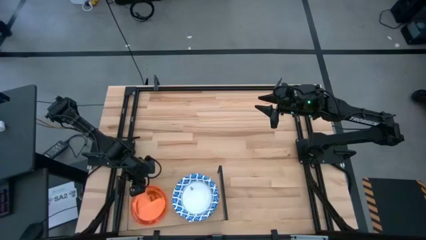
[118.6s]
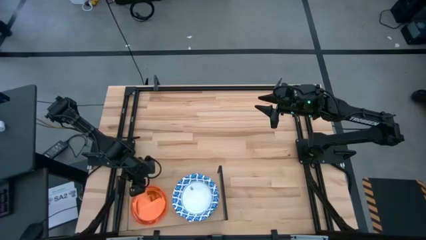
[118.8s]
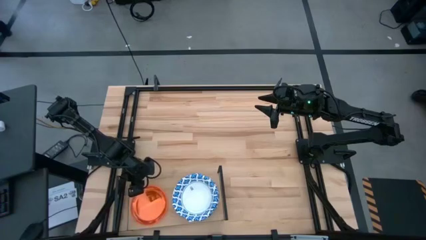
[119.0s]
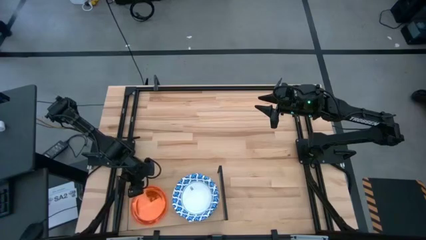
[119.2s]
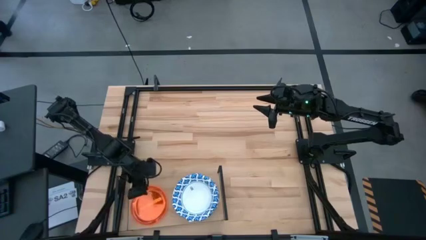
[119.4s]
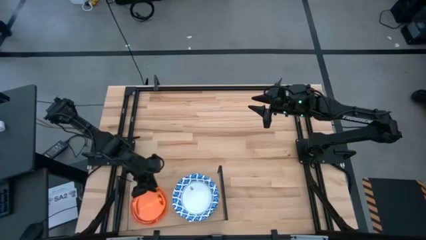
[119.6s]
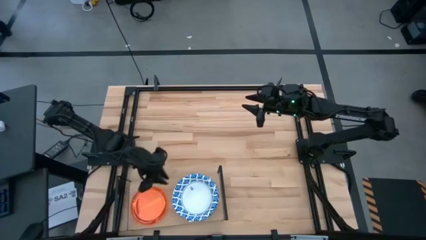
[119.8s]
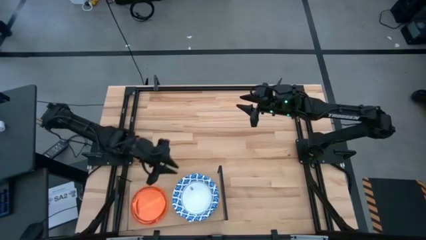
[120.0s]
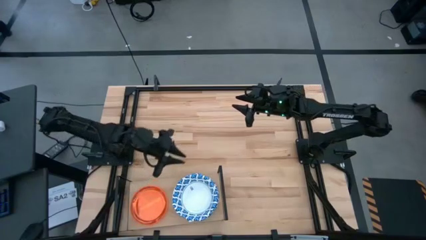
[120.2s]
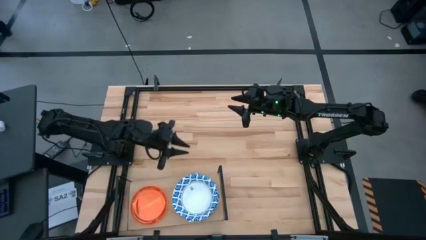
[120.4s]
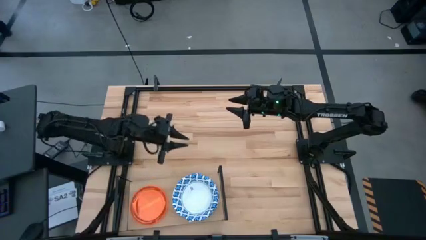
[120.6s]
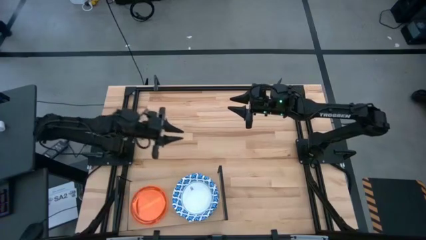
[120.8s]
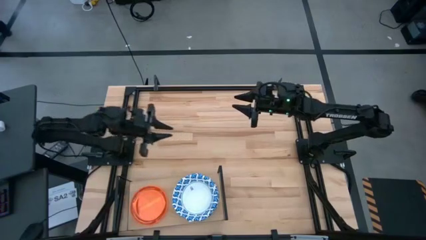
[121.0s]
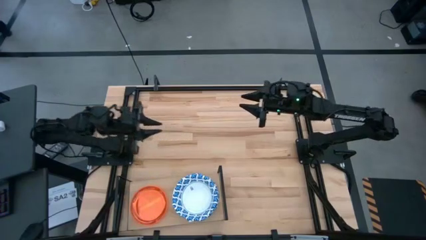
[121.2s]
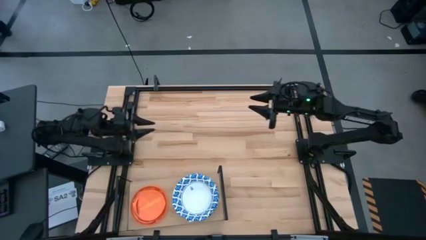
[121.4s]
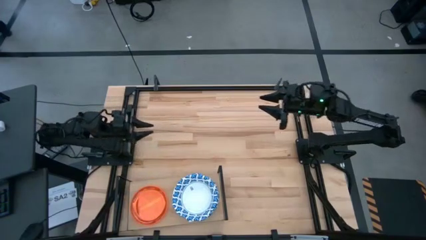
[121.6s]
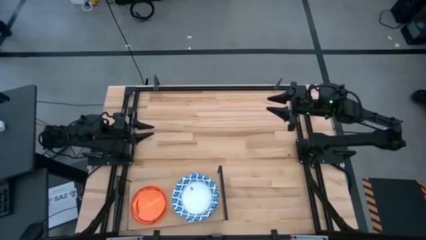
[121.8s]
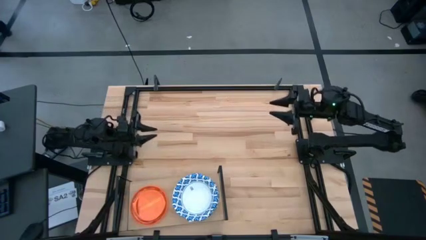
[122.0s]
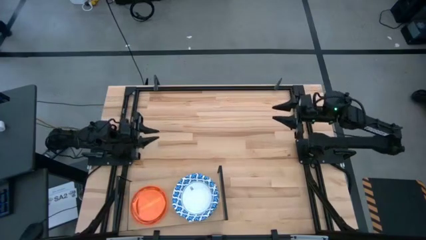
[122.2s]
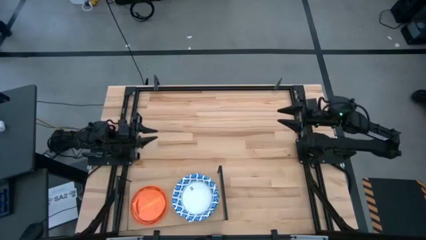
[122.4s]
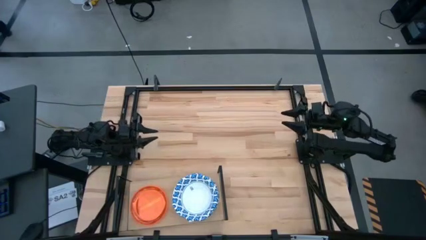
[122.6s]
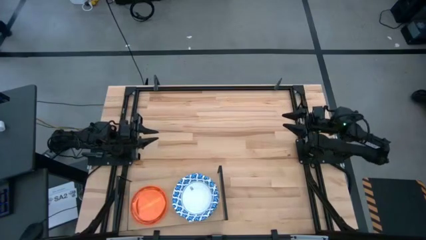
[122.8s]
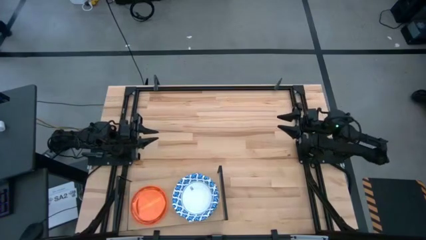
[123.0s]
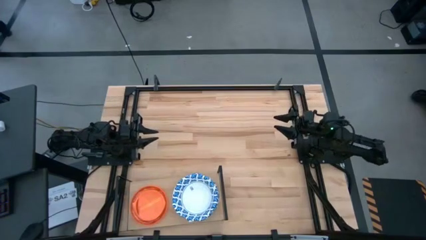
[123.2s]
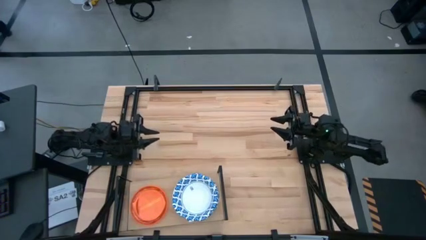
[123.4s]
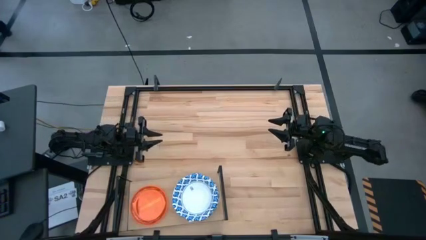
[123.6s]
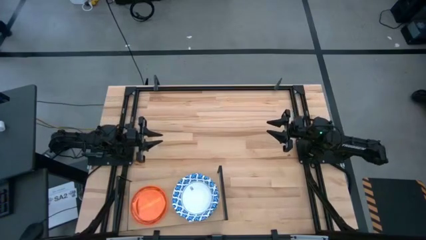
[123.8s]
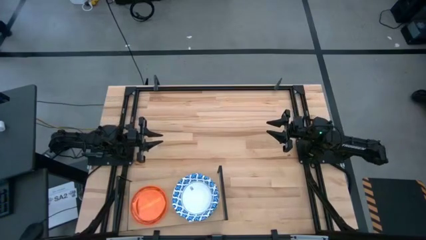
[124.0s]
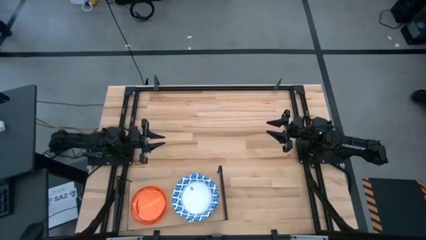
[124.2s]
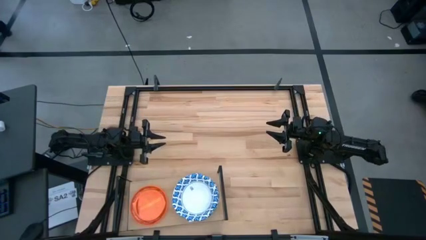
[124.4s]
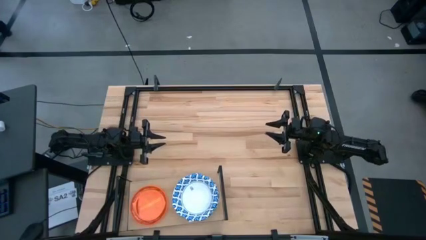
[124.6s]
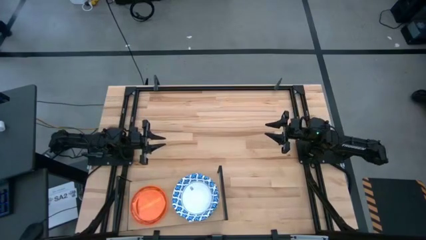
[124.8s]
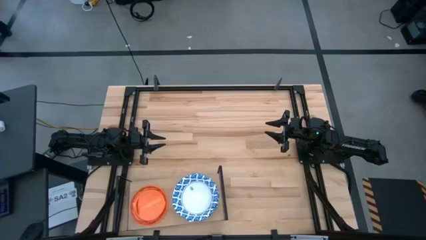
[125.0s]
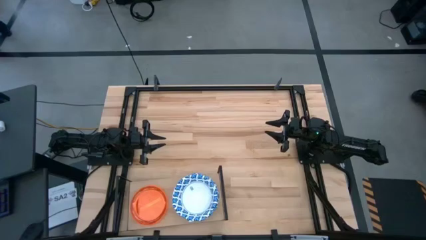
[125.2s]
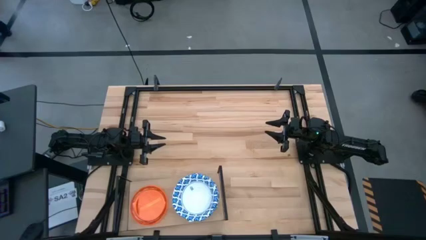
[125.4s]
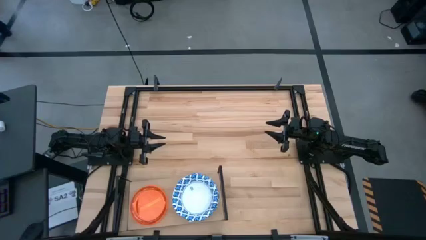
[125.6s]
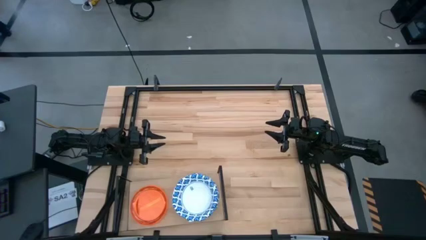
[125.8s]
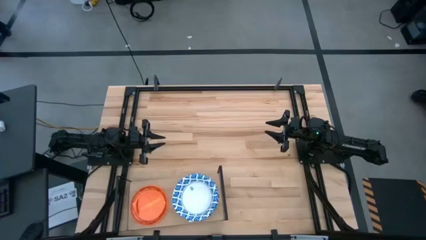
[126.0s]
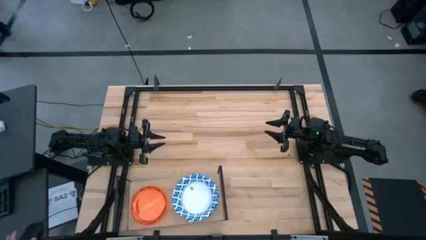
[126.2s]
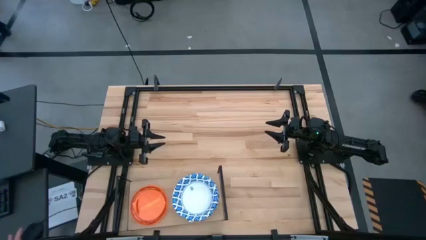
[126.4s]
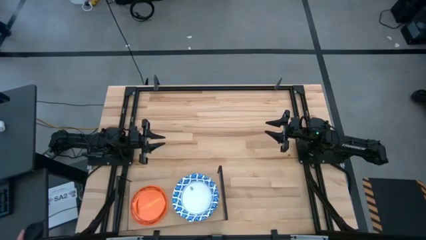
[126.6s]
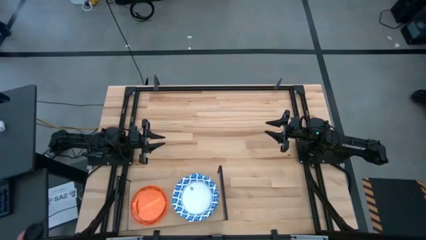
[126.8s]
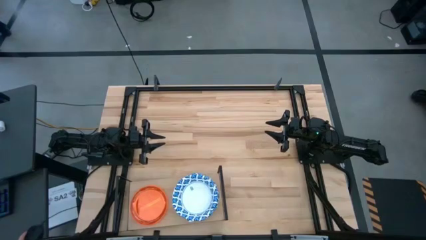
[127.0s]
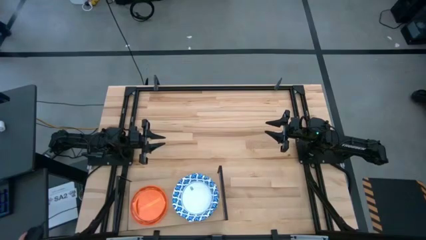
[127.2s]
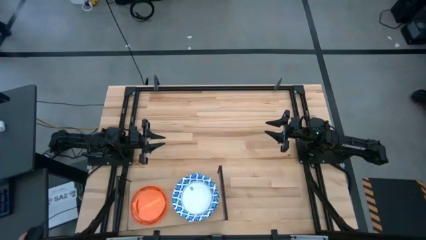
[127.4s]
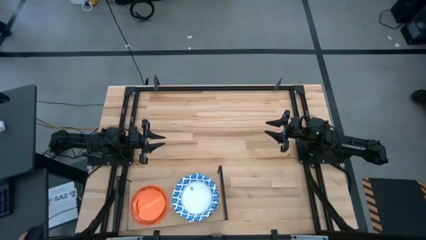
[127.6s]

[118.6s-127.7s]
Task: Place and stack plates onto a shelf
Return to Home Position

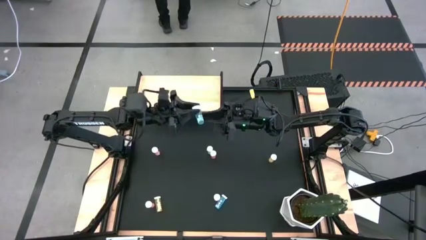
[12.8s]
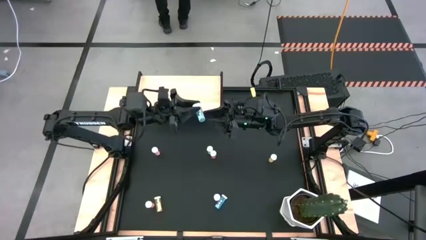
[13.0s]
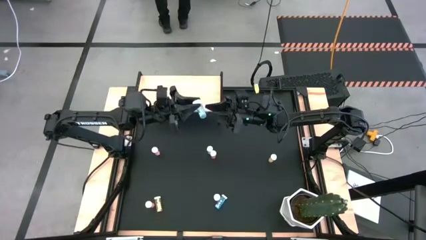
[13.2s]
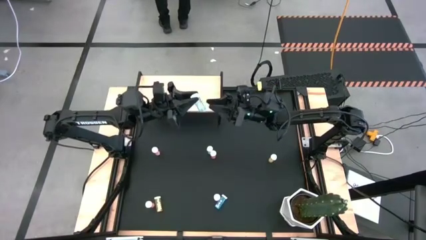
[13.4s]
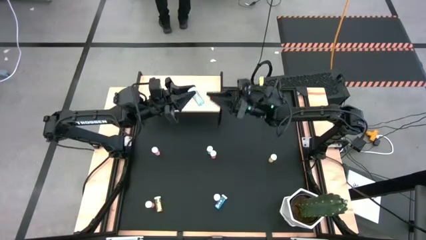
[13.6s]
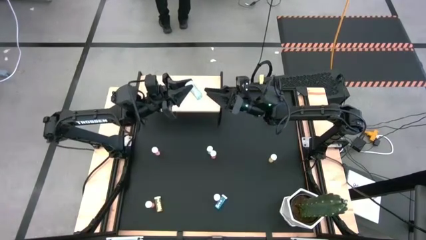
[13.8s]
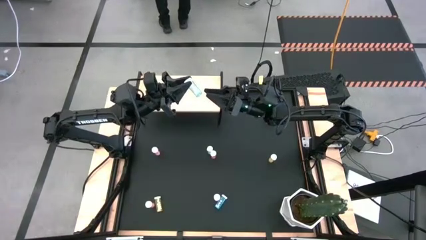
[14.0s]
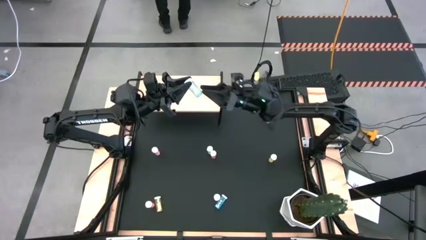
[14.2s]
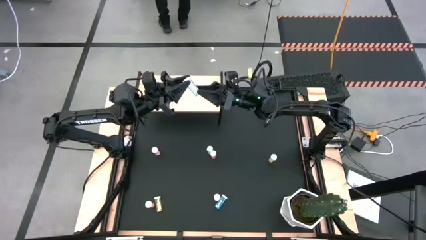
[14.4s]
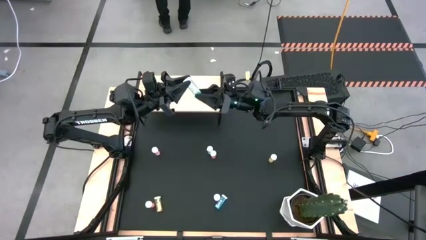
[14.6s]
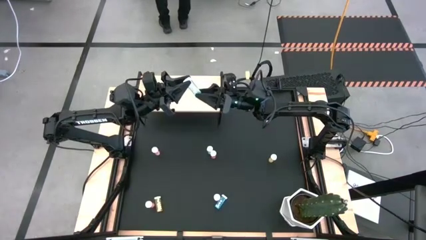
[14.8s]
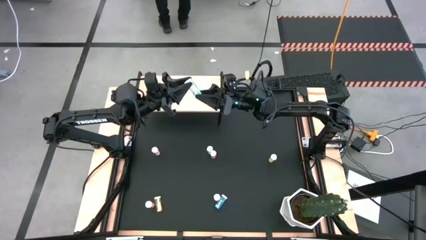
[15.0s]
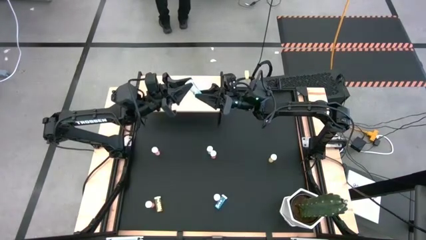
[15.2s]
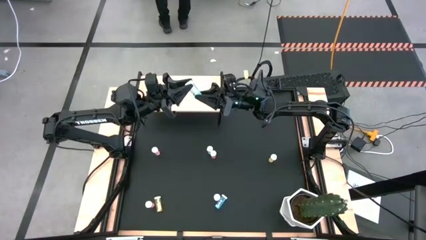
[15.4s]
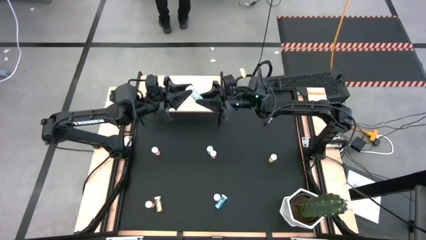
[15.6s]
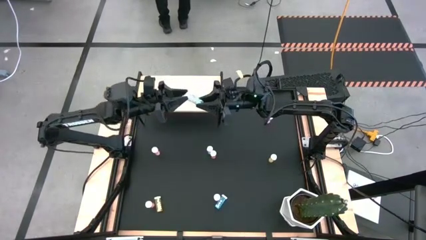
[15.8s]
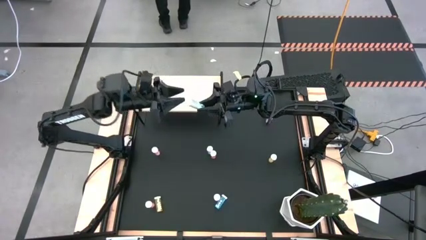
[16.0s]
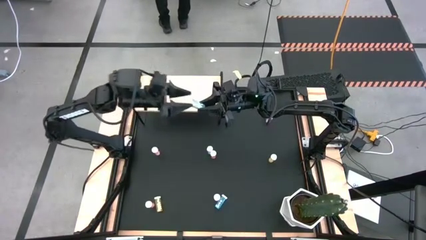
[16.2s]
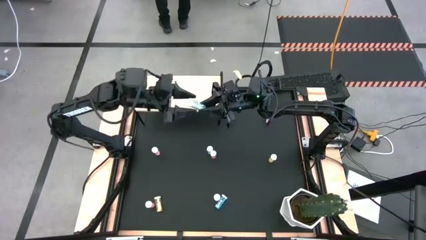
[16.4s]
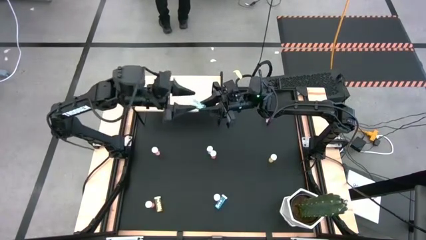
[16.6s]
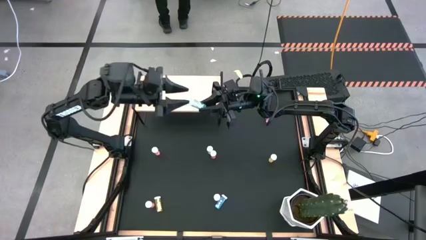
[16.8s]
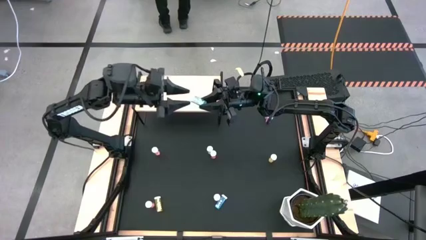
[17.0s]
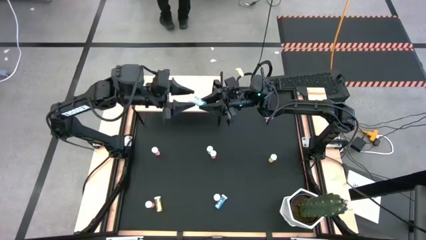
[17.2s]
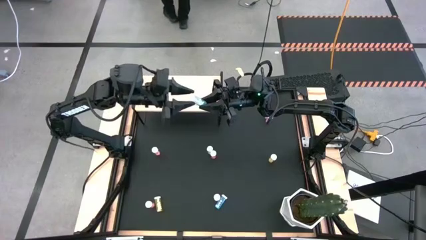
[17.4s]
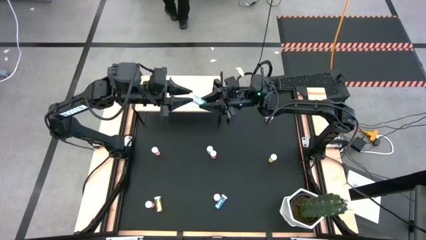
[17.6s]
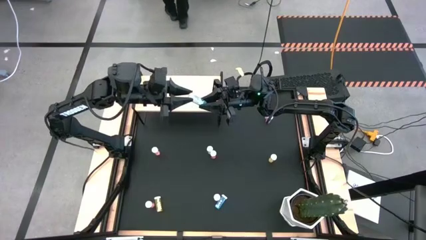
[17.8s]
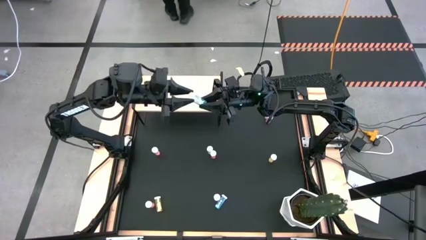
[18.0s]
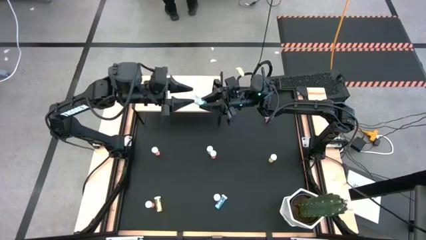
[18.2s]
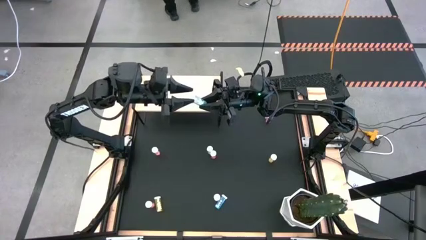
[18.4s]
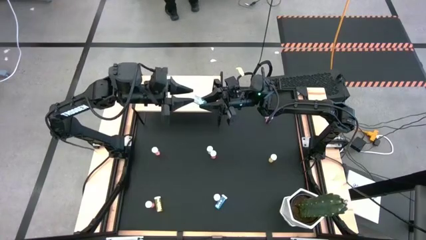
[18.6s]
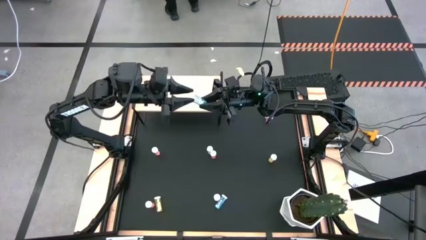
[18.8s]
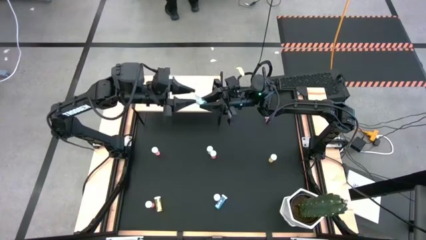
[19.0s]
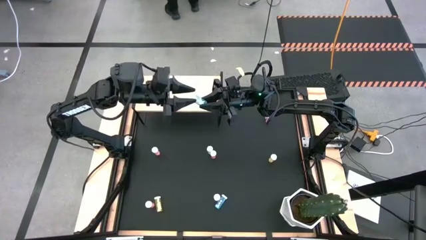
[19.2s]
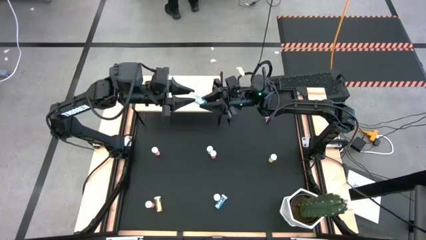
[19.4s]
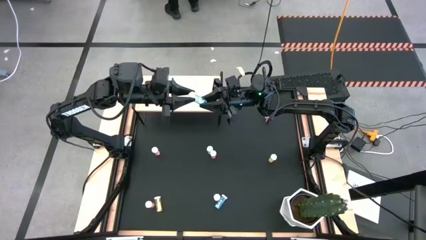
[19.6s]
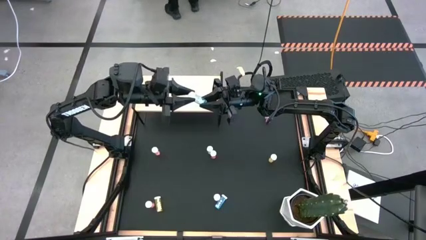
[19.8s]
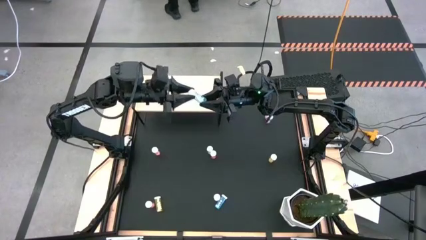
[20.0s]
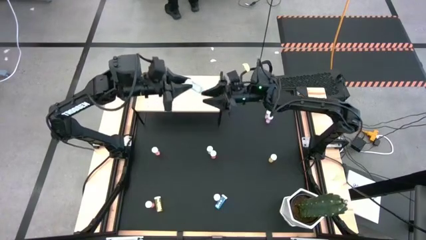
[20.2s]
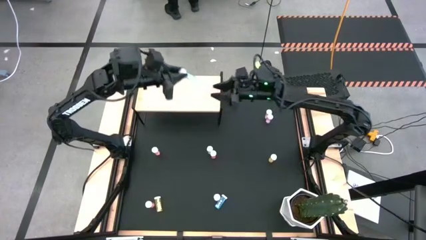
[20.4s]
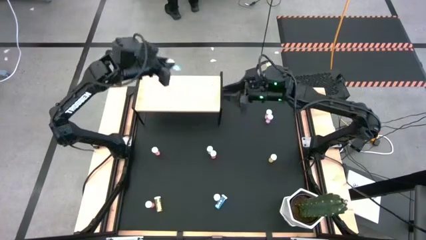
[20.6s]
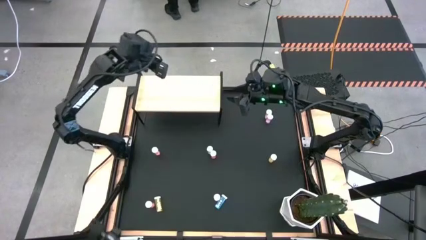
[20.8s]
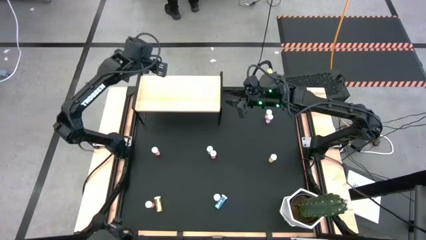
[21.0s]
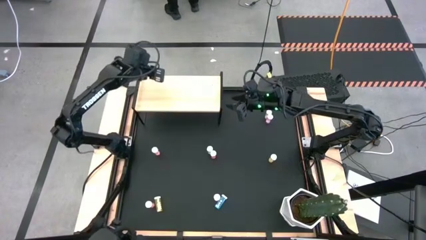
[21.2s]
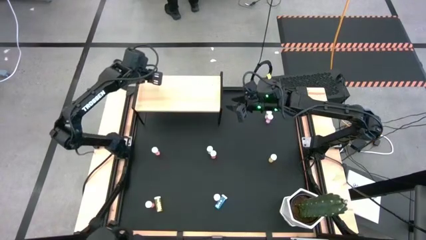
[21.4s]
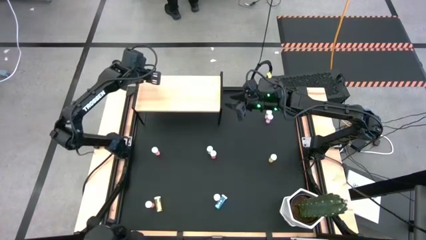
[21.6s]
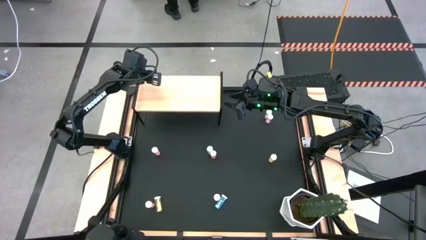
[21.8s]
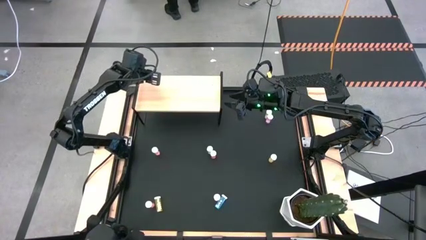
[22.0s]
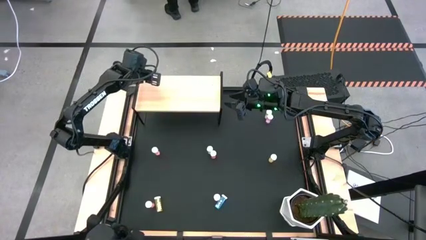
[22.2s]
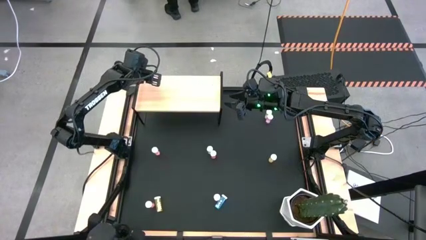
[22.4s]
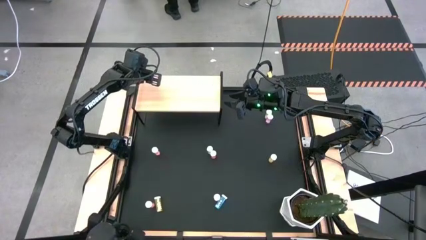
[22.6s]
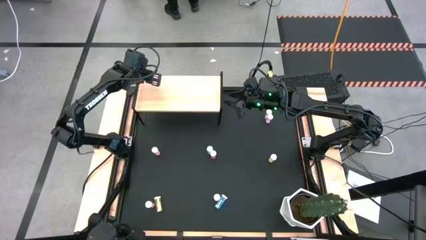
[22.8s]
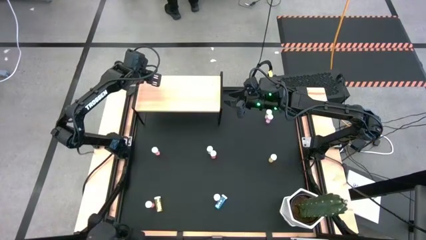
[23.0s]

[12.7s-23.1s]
Task: Pick and place medicine bottles onto shelf by color
Put the top left blue pill bottle on the shelf
